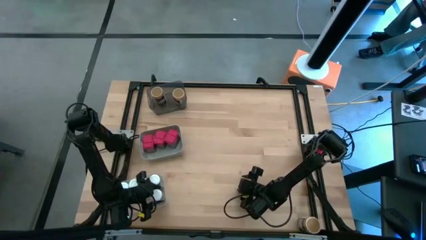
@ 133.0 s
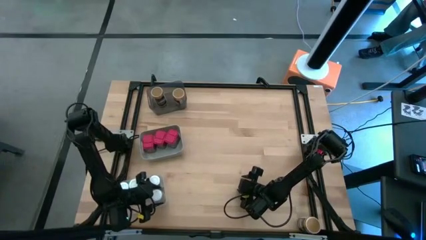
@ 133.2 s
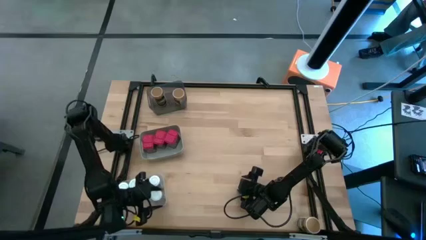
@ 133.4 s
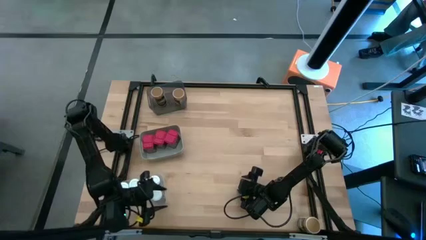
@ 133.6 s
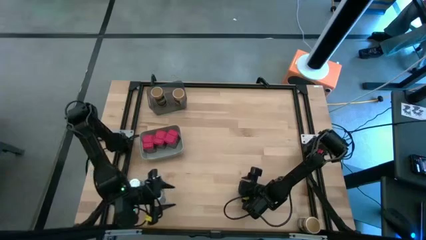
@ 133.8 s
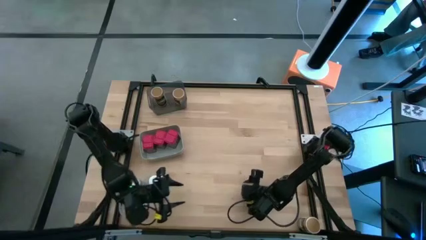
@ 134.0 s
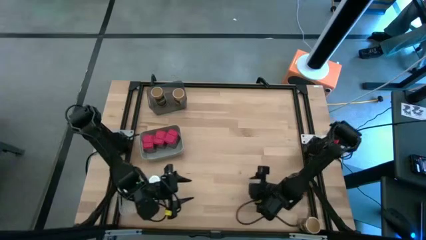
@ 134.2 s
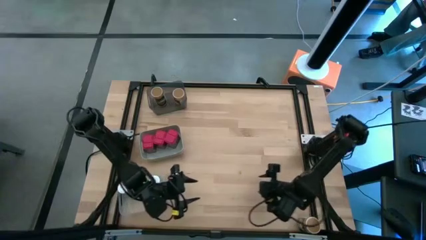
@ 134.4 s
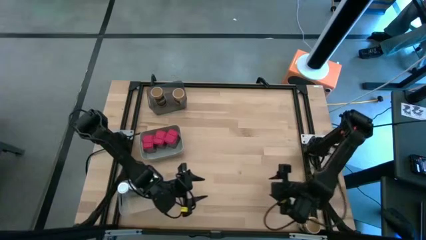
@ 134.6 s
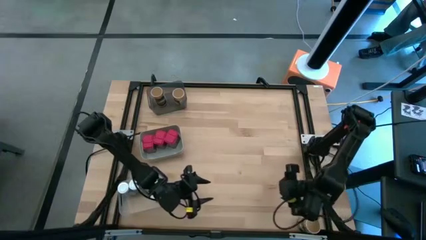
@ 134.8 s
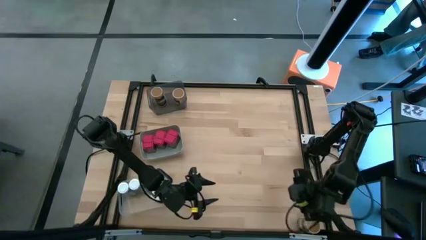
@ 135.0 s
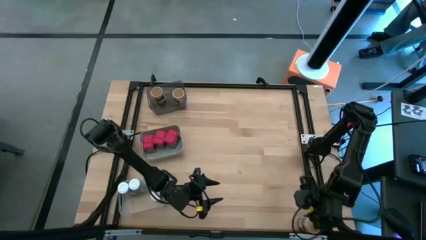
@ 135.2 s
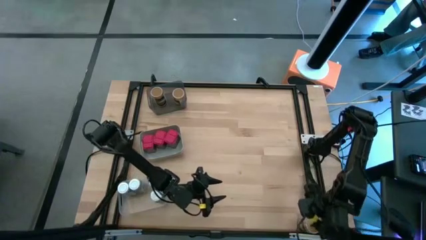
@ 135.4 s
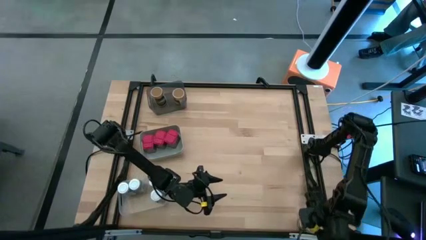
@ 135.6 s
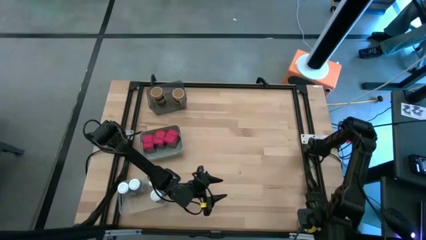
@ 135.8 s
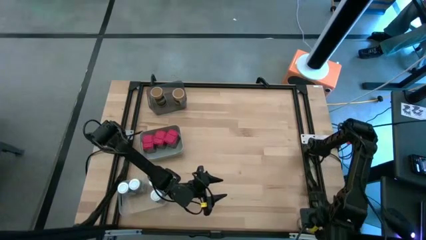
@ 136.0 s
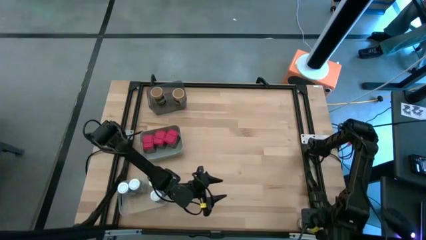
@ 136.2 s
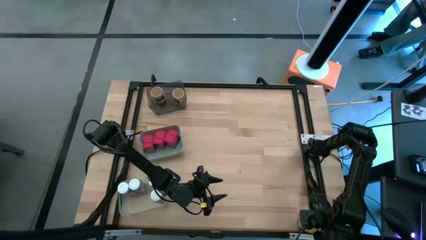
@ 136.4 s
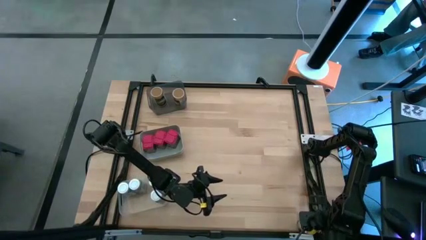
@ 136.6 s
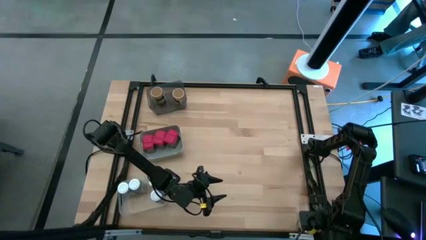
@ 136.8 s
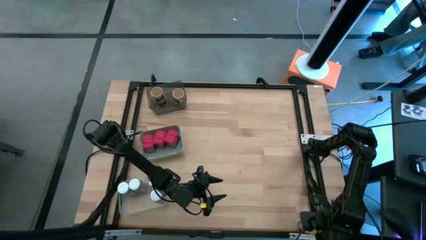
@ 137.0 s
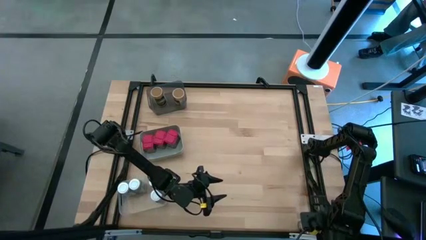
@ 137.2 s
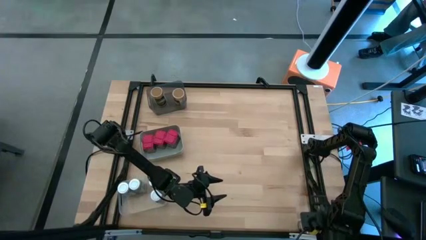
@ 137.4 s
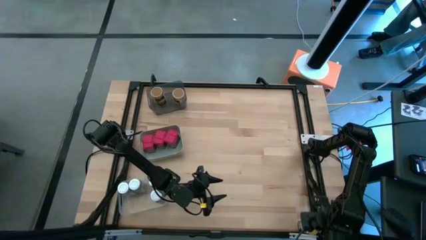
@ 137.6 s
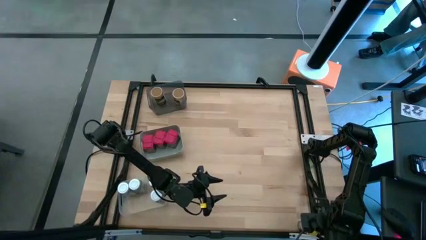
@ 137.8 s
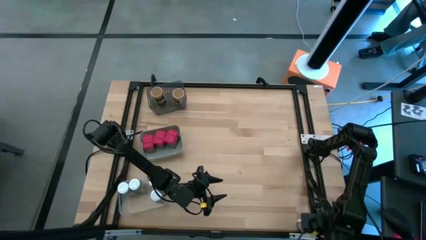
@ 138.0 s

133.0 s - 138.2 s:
Task: Sort spices by type
Put the gold seasoning bottle into the black transparent bin

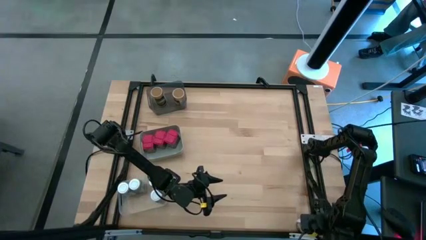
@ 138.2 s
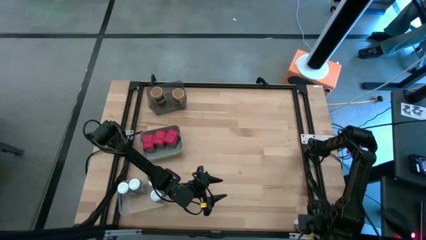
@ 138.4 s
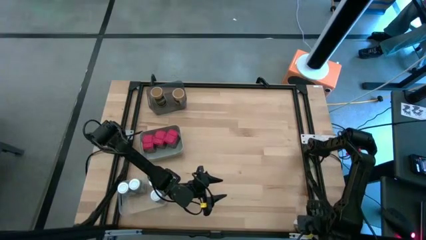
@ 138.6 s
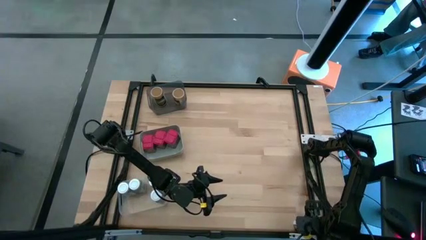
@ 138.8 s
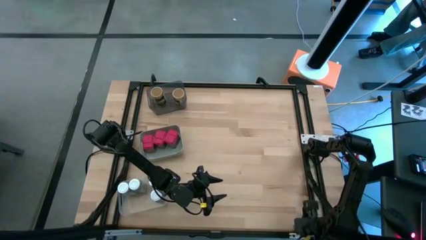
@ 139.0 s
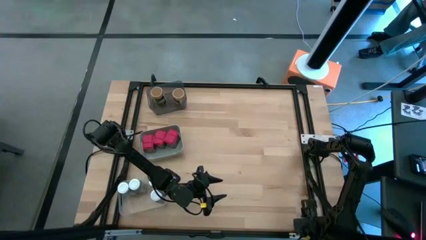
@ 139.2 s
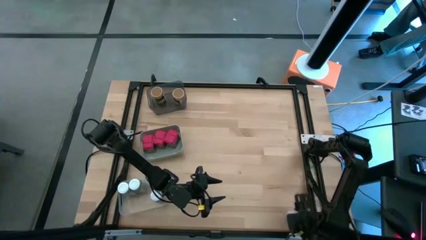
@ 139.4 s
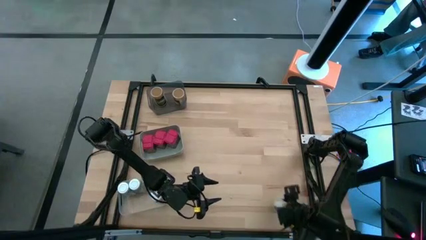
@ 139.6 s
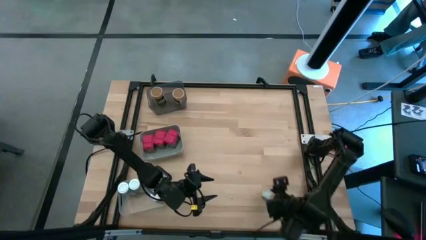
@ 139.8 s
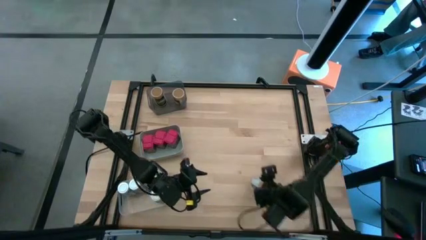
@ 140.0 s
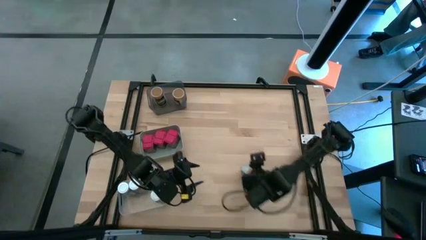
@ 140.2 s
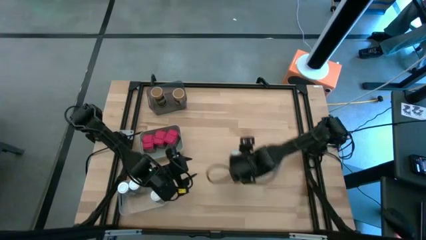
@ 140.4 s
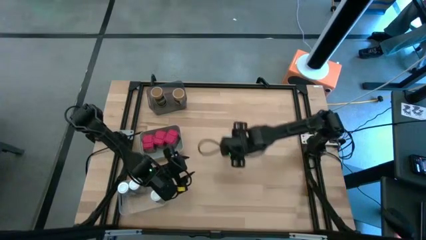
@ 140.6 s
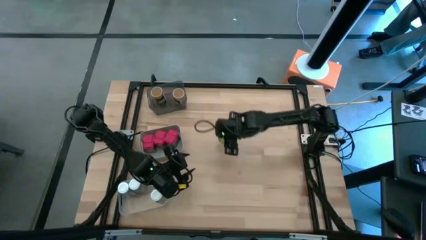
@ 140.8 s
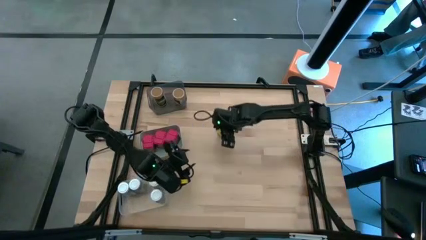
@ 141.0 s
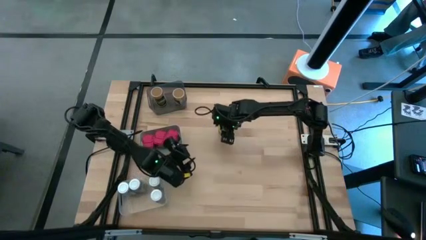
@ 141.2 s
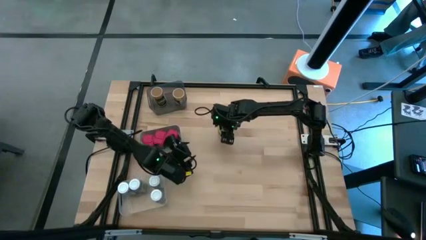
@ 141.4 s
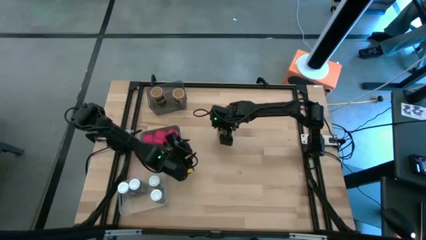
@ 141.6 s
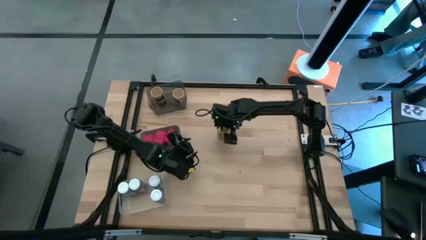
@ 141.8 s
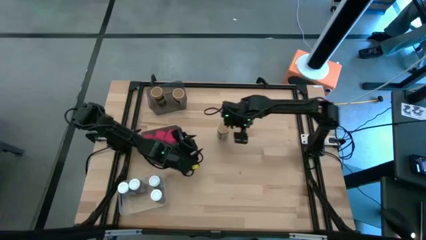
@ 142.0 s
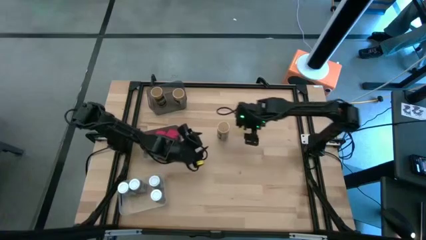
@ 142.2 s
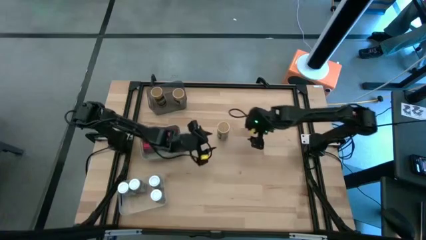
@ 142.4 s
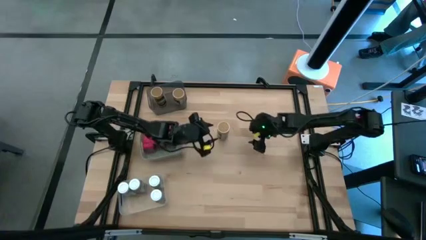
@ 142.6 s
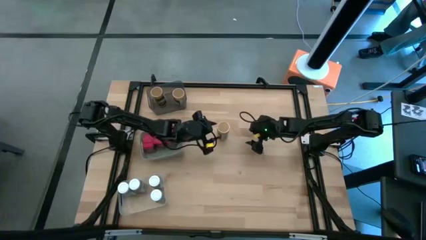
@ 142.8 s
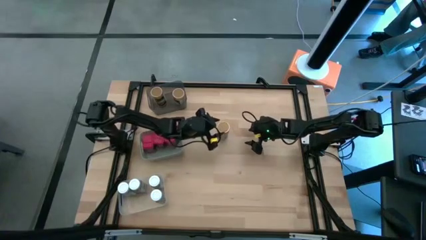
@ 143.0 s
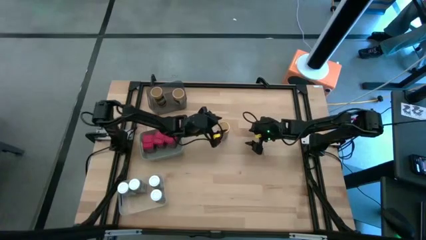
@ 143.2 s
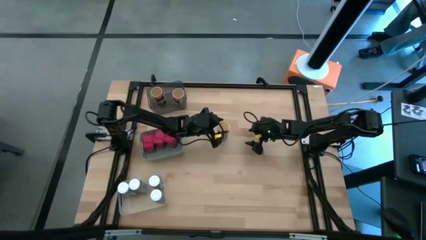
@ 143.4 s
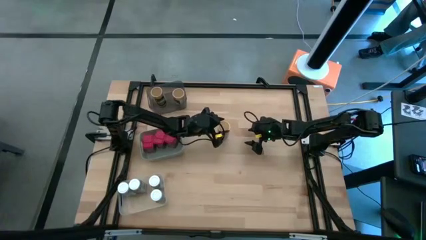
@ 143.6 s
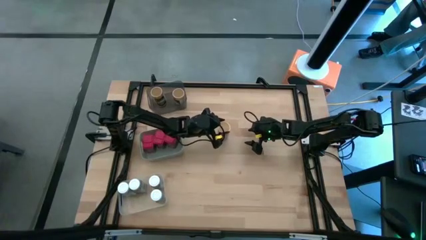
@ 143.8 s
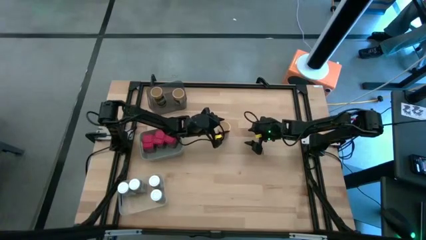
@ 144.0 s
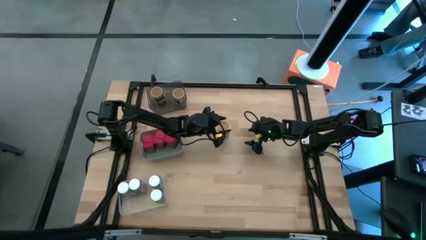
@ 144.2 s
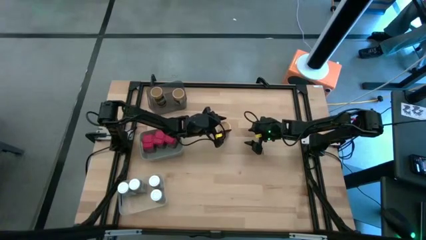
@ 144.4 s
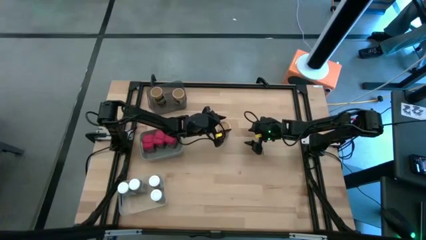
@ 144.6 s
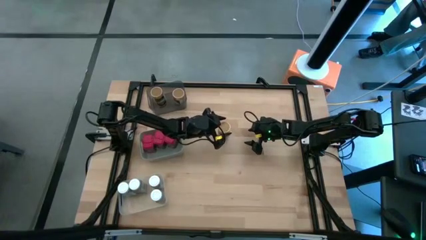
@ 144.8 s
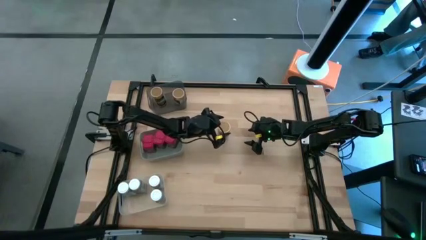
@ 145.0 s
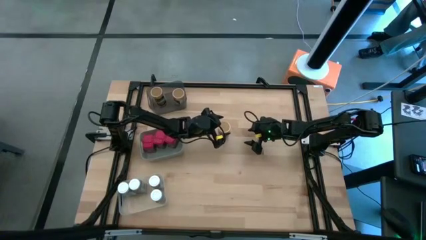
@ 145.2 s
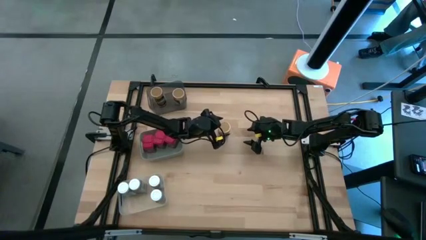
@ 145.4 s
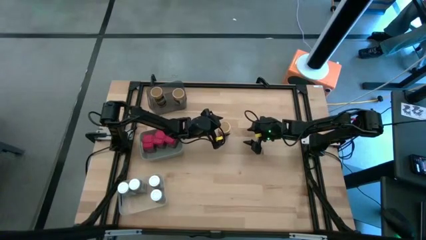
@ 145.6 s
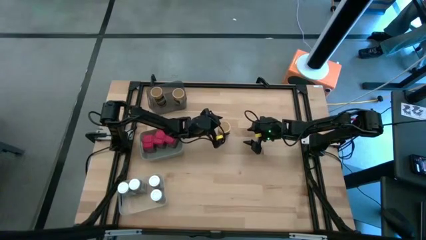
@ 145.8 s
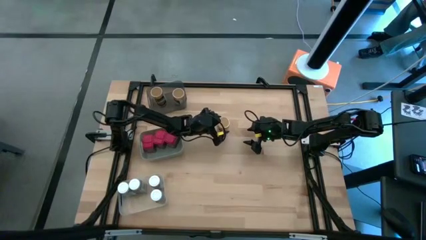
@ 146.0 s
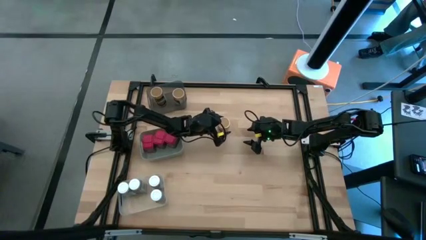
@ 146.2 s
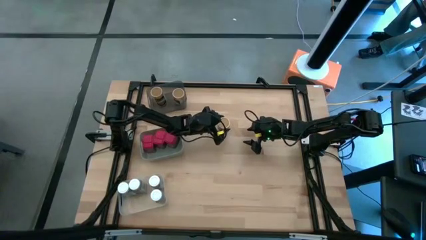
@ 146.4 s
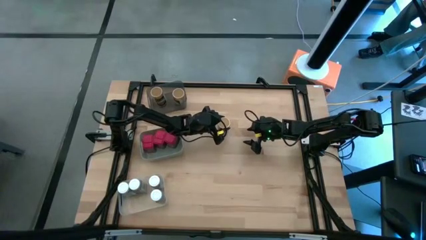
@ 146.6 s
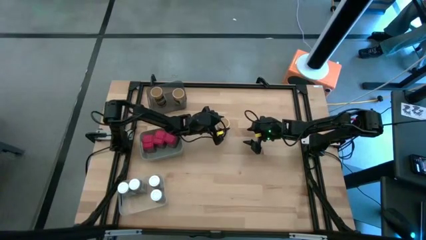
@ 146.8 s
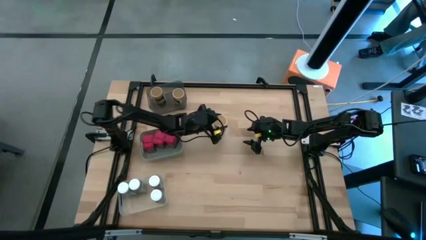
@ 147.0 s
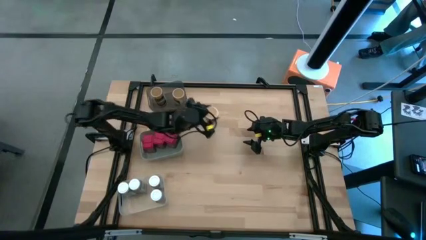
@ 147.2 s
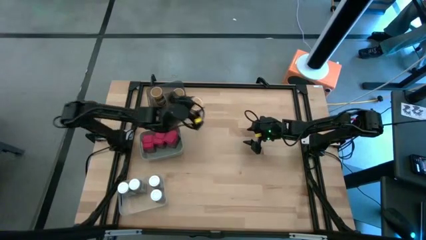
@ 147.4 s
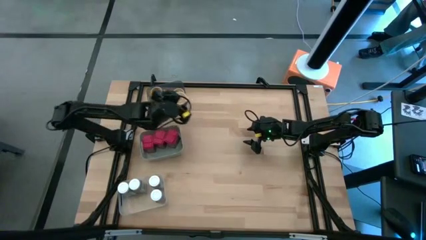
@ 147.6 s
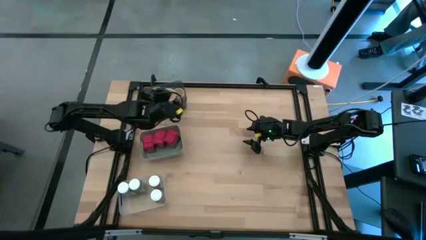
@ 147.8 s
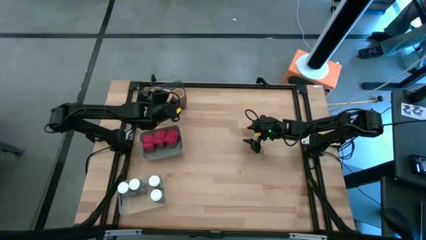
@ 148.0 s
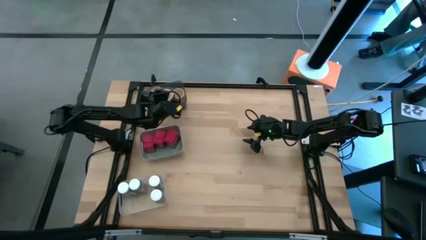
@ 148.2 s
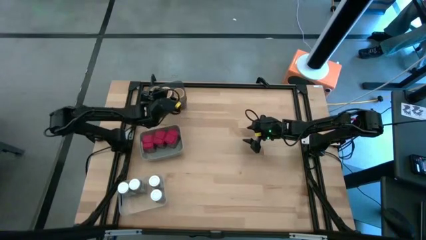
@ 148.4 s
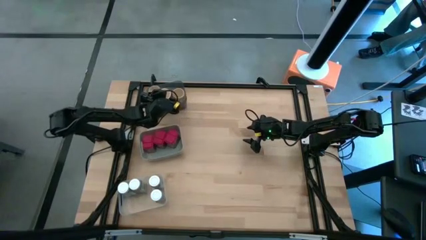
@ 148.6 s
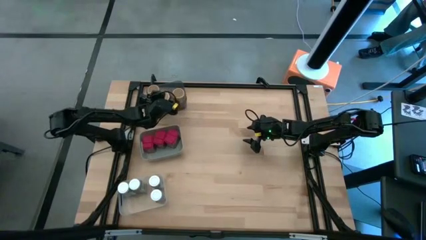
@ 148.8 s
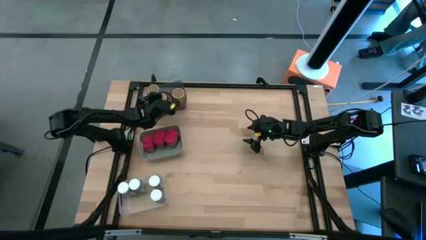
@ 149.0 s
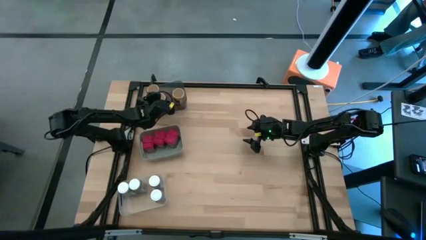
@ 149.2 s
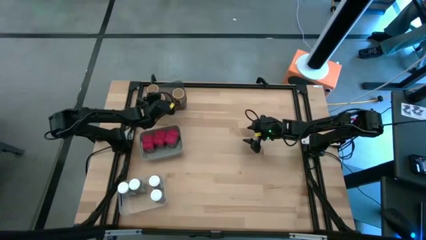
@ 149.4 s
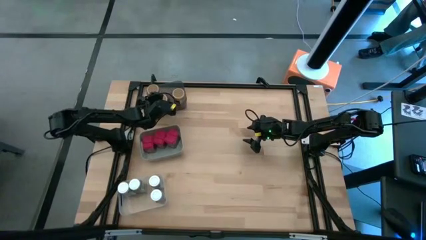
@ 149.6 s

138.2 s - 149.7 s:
Put the gold seasoning bottle into the black transparent bin
